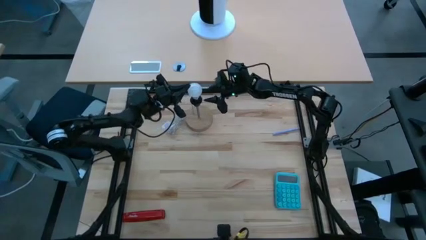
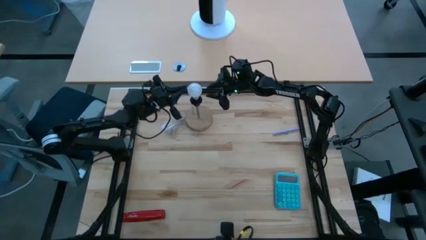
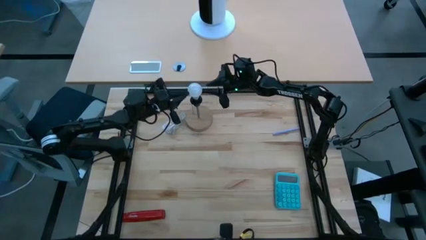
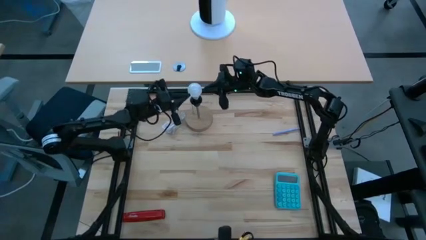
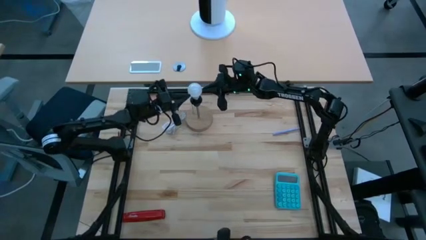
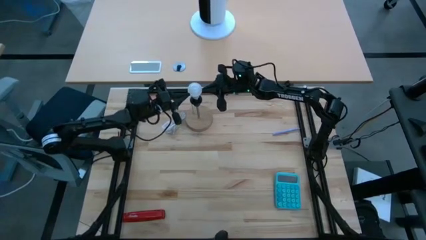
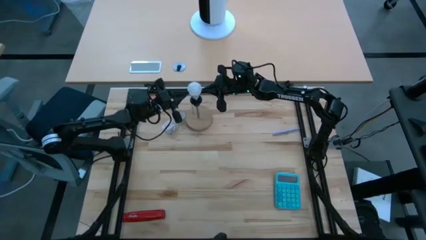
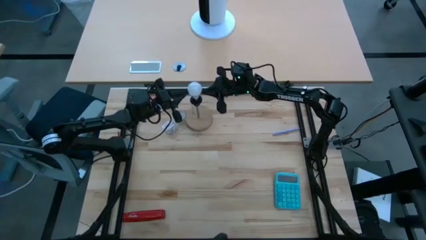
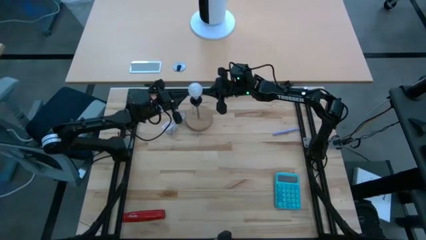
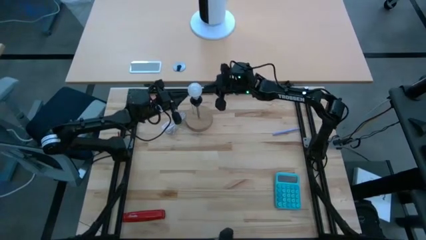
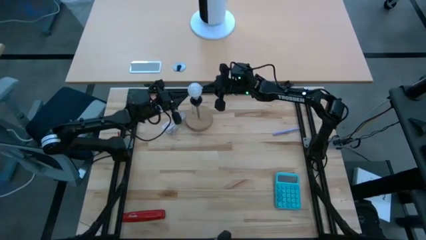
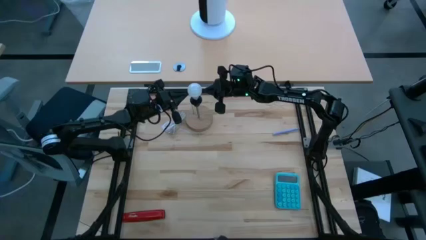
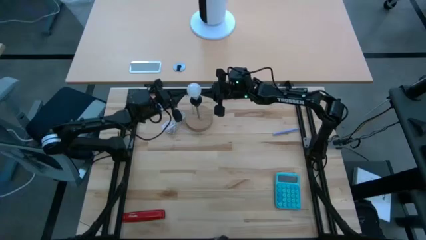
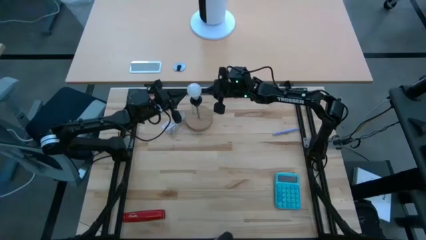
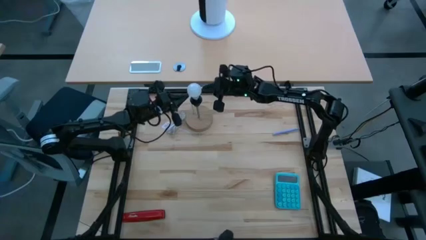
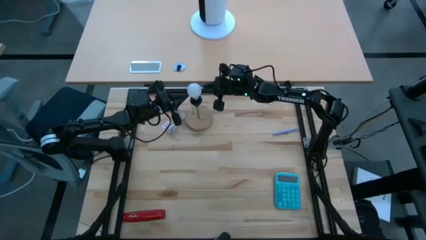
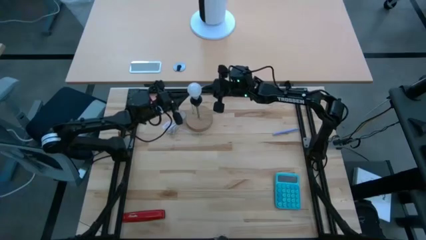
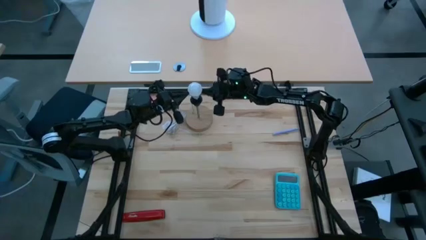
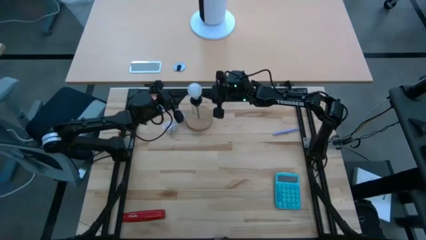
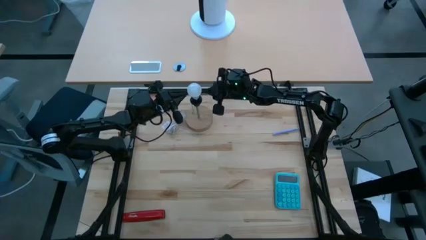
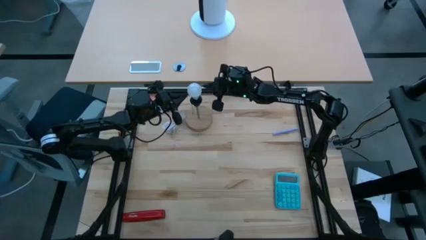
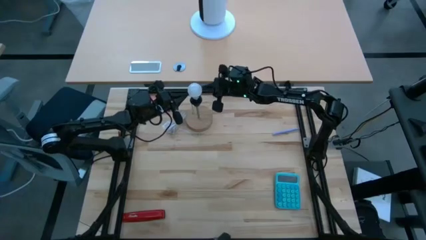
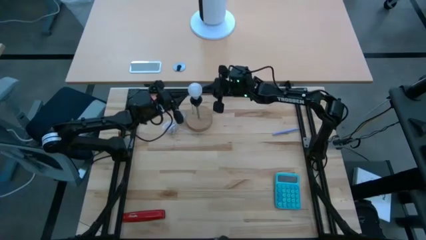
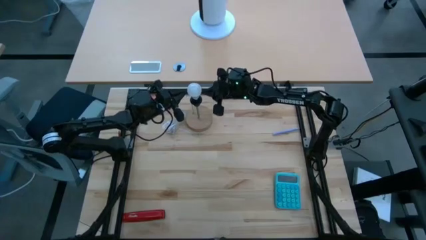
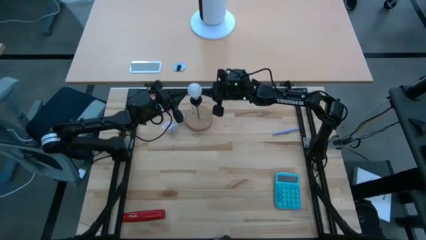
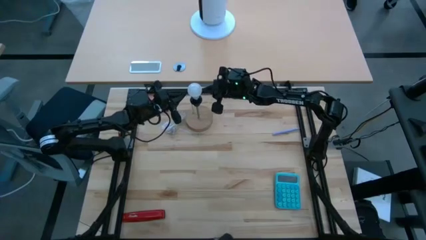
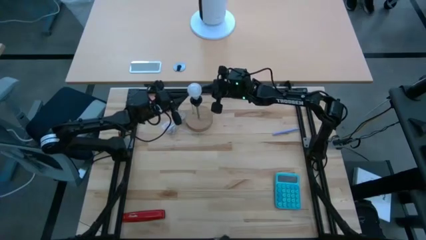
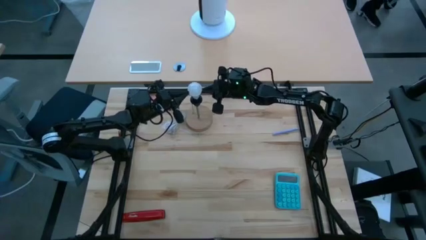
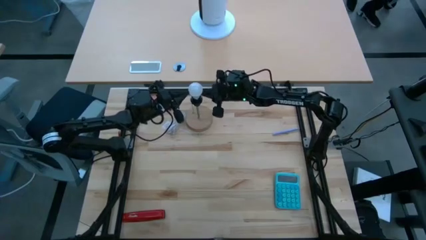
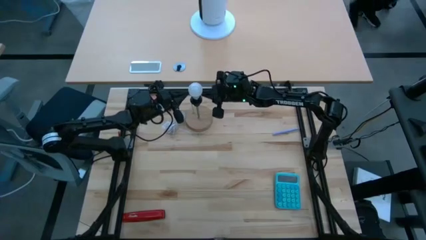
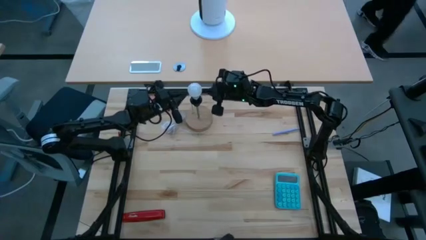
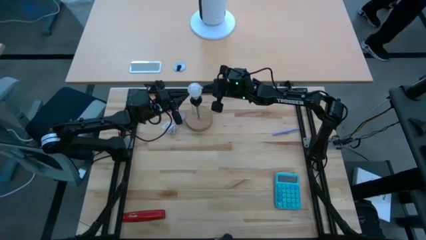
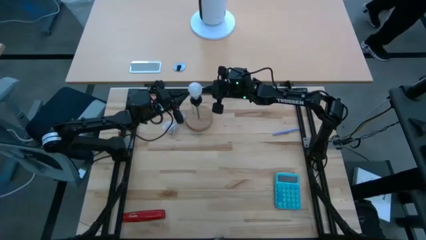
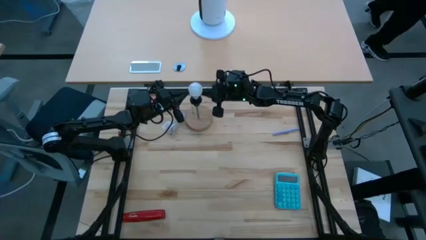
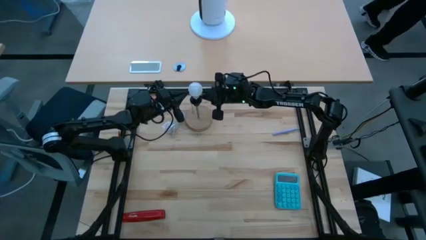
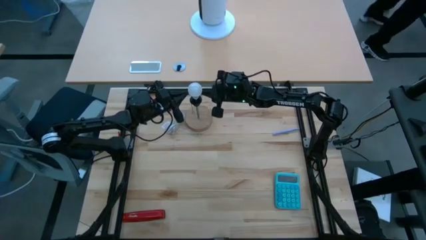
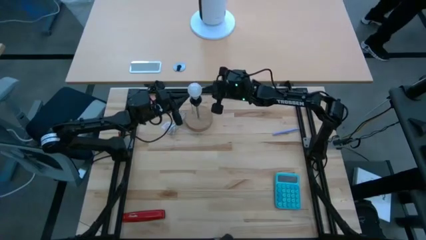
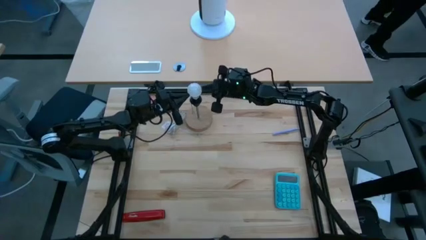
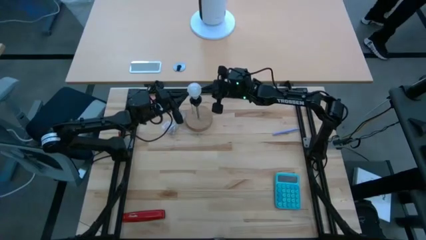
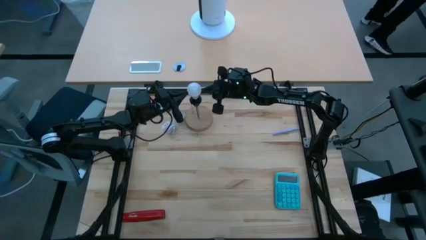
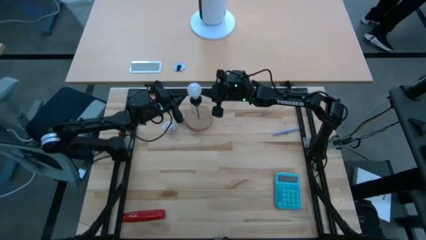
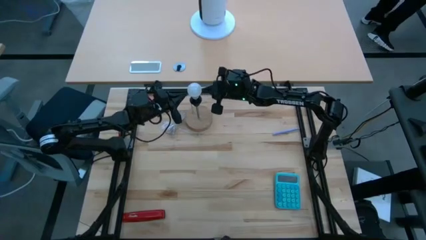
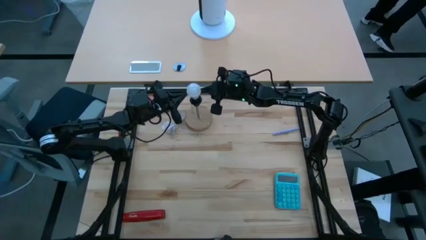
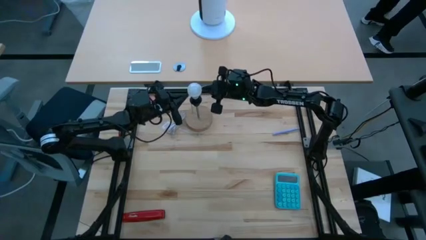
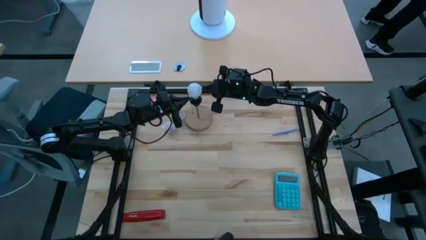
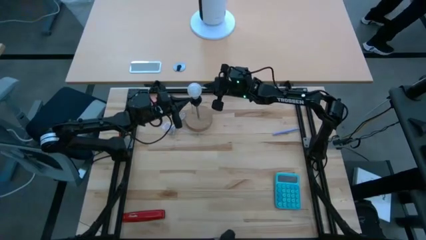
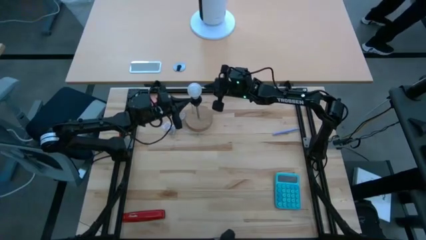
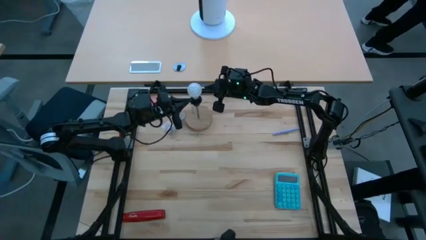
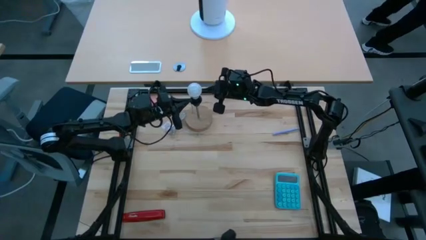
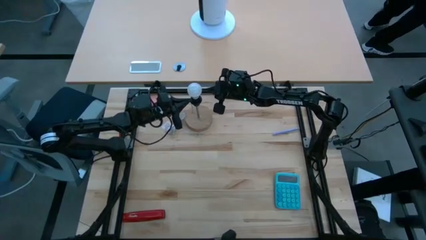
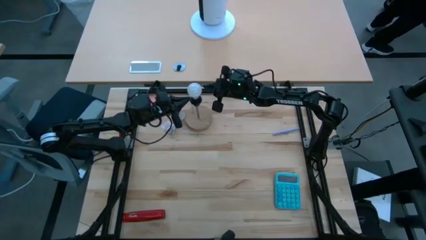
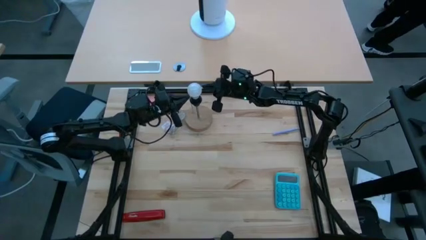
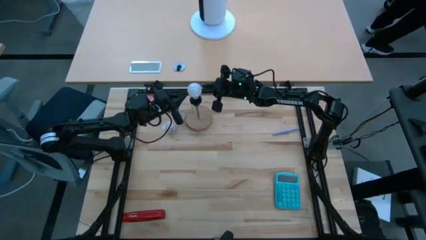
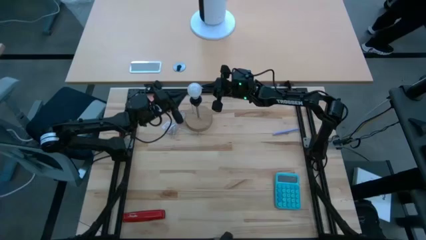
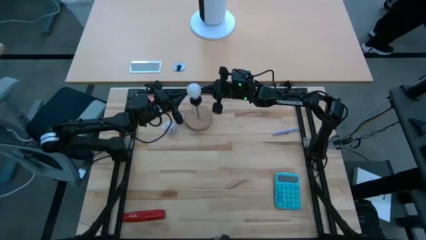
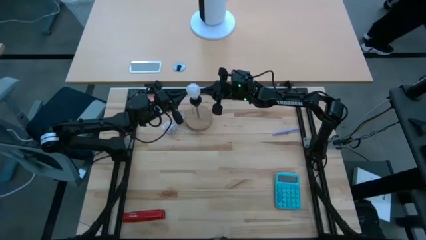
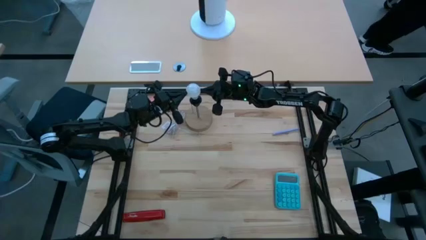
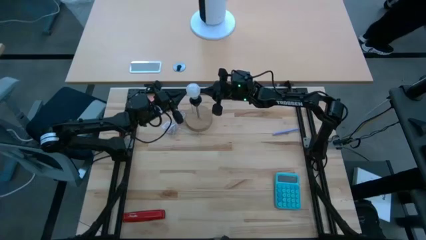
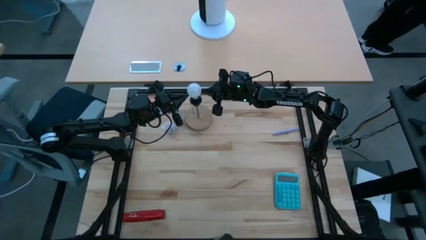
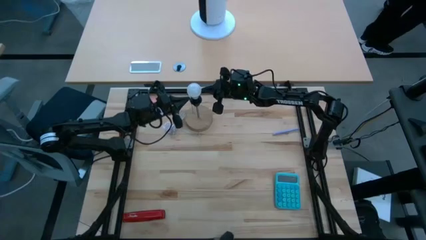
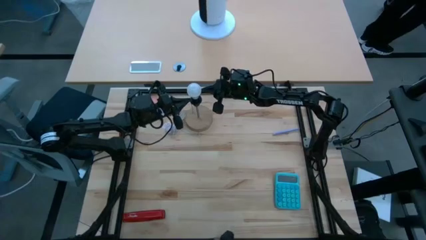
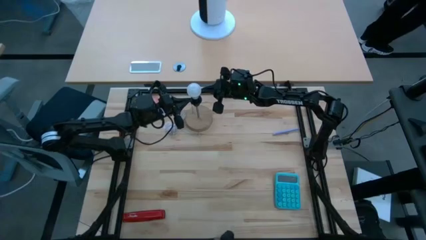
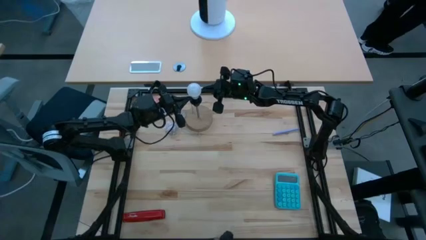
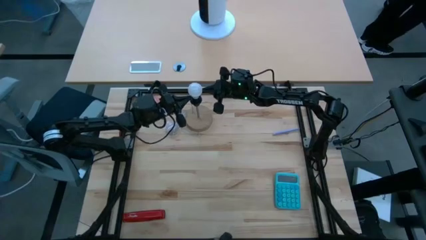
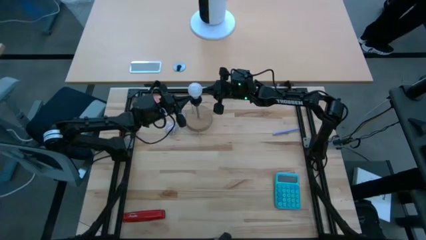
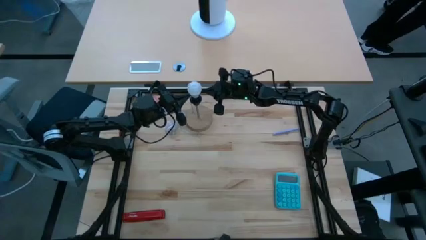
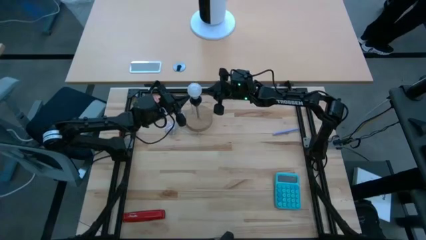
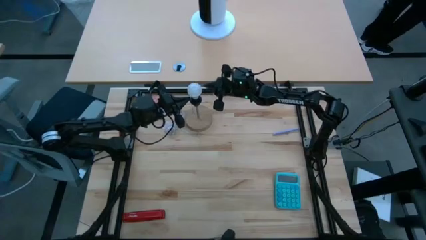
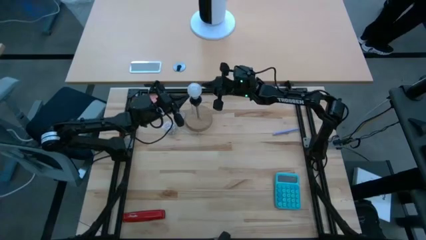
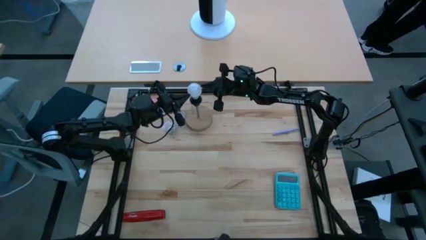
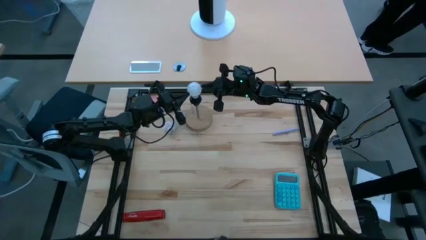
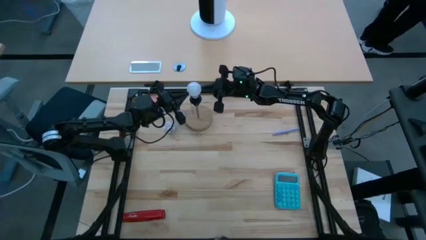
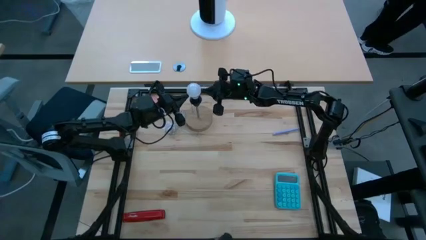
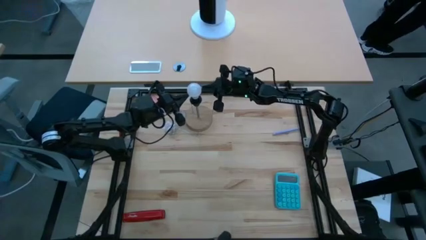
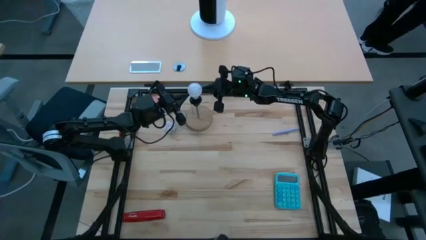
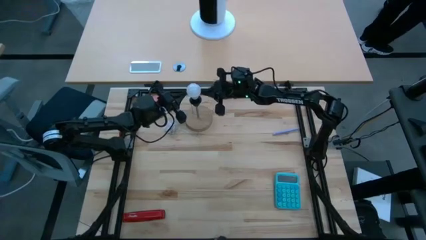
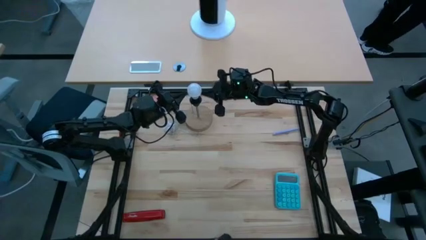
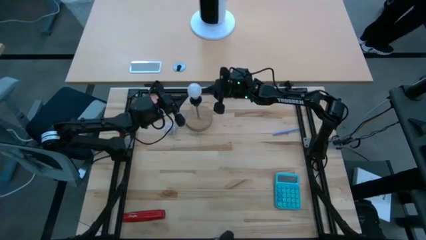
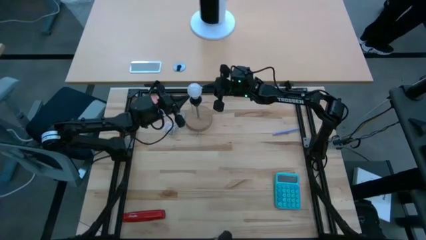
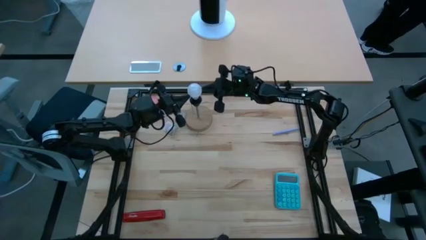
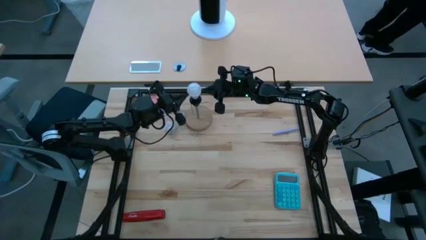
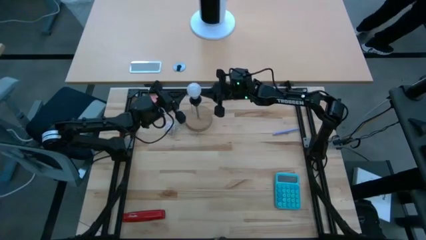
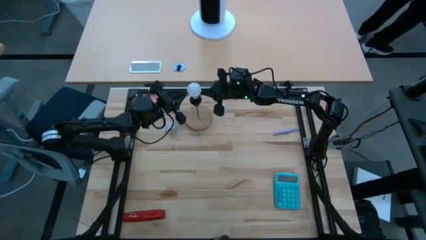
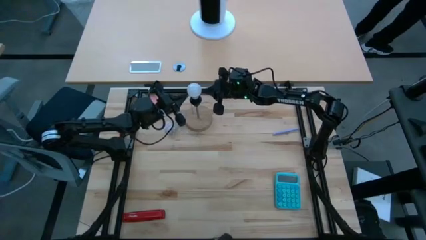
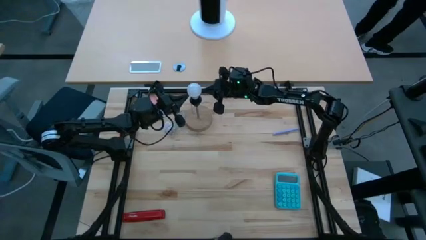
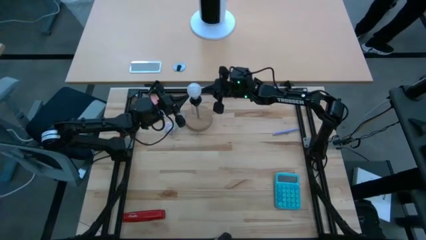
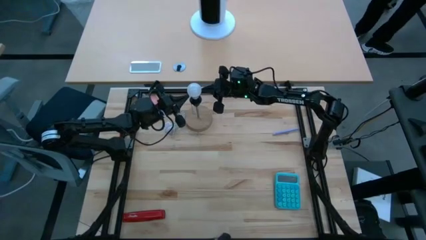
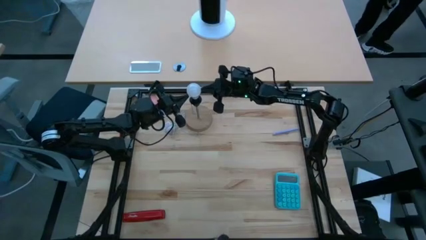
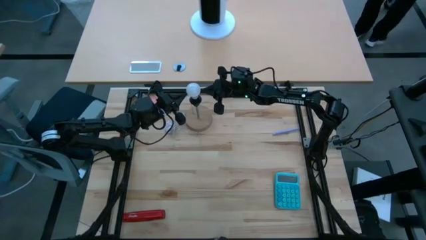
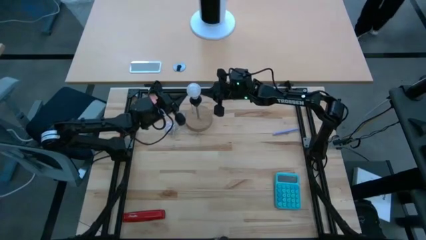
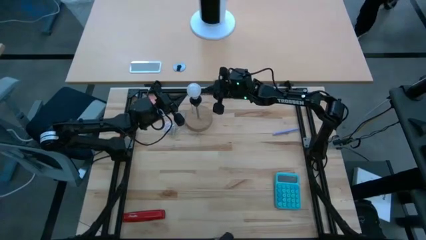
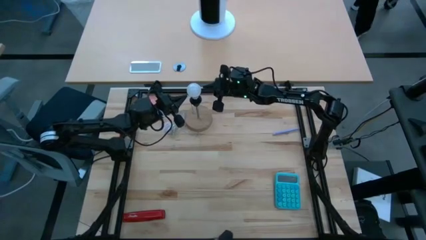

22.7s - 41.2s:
Task: Screw lightbulb
Insert the lightbulb into the wooden table lamp
